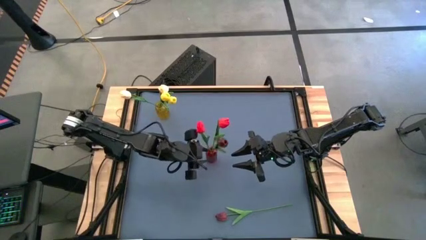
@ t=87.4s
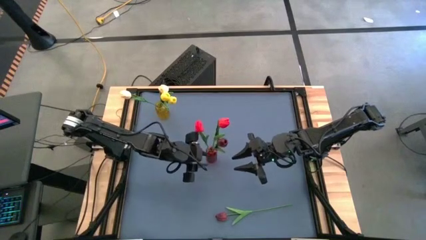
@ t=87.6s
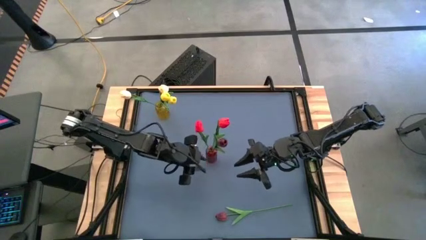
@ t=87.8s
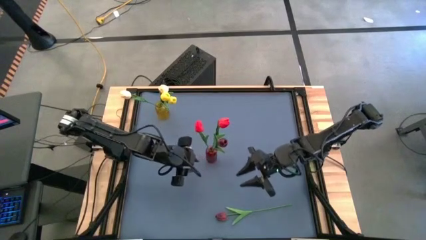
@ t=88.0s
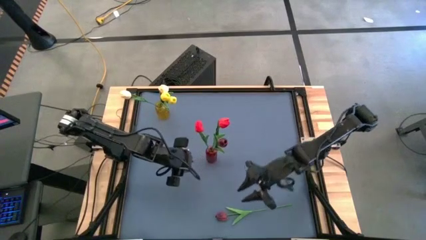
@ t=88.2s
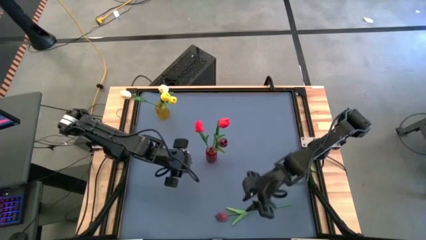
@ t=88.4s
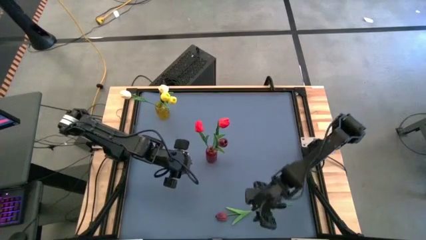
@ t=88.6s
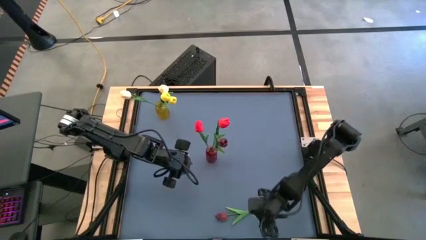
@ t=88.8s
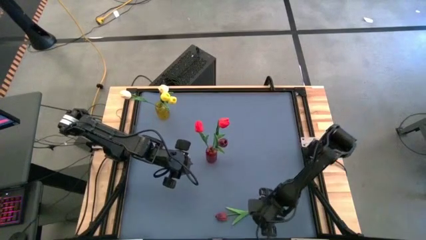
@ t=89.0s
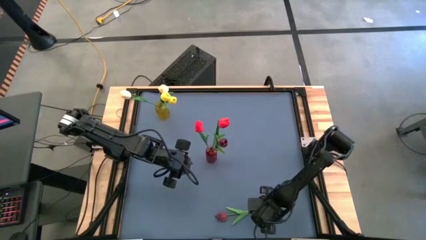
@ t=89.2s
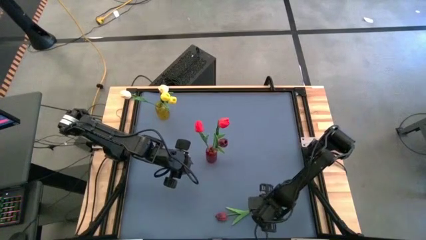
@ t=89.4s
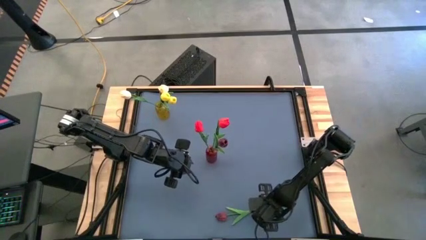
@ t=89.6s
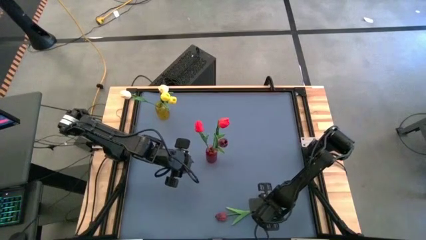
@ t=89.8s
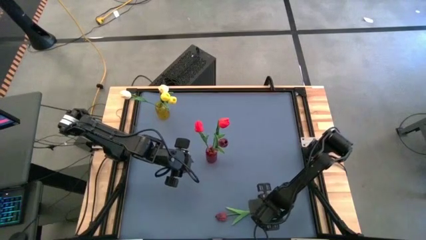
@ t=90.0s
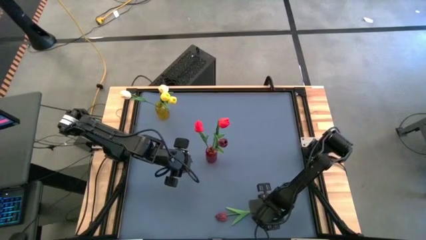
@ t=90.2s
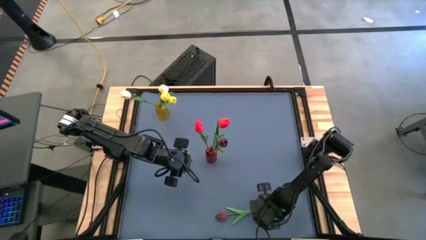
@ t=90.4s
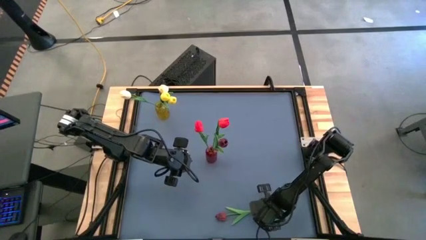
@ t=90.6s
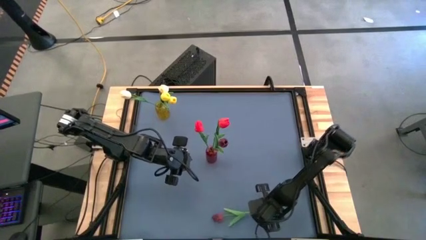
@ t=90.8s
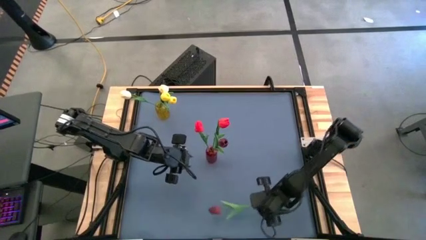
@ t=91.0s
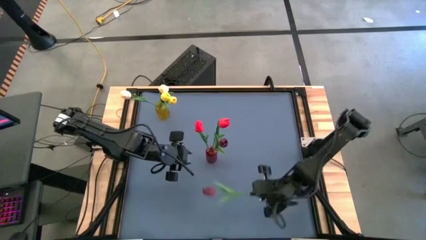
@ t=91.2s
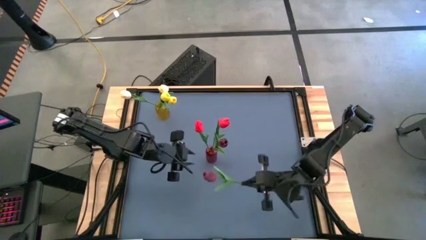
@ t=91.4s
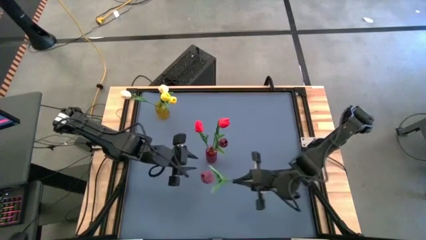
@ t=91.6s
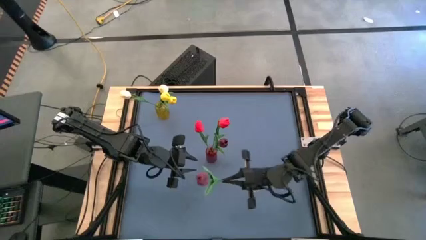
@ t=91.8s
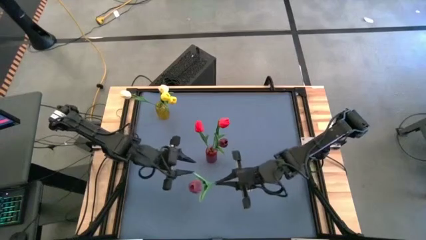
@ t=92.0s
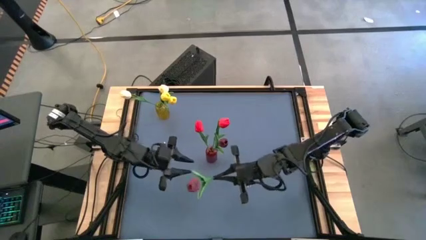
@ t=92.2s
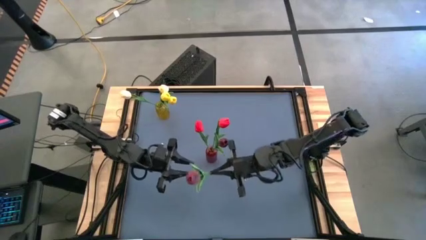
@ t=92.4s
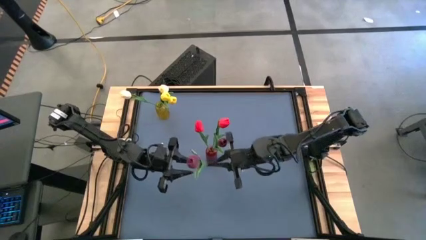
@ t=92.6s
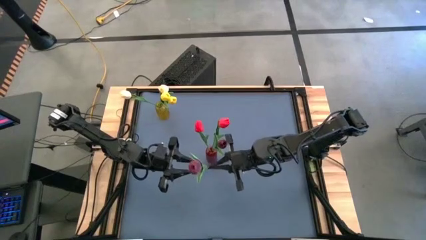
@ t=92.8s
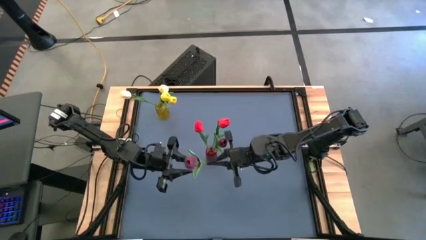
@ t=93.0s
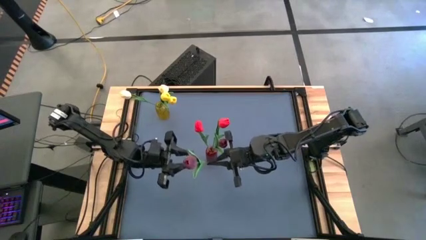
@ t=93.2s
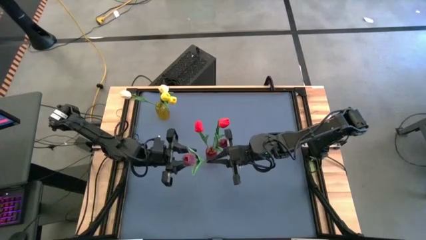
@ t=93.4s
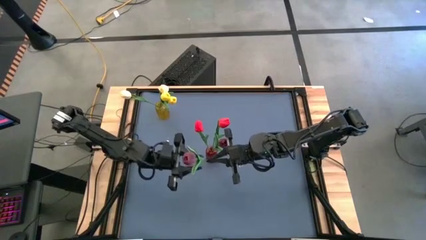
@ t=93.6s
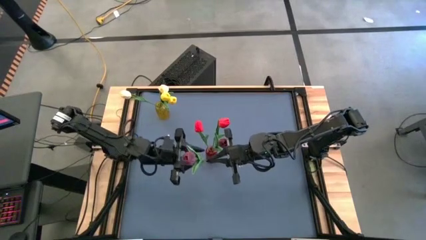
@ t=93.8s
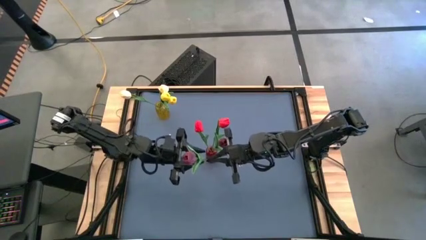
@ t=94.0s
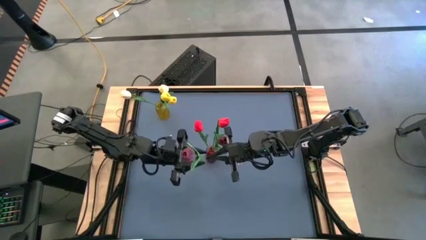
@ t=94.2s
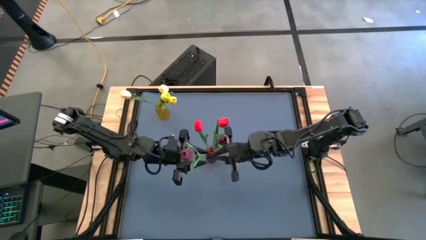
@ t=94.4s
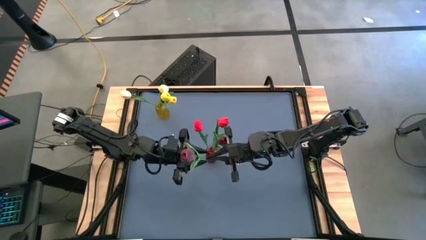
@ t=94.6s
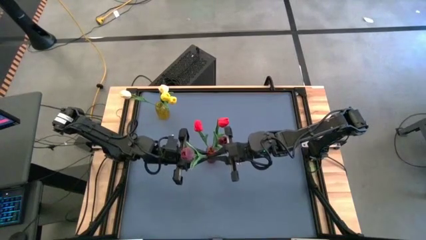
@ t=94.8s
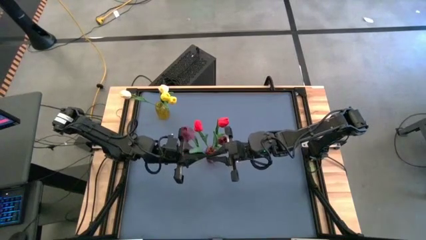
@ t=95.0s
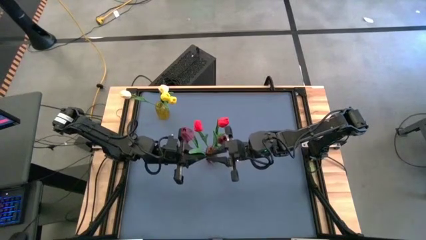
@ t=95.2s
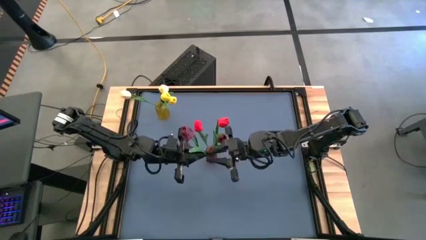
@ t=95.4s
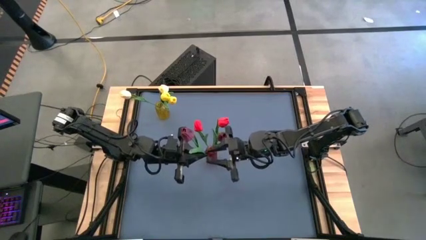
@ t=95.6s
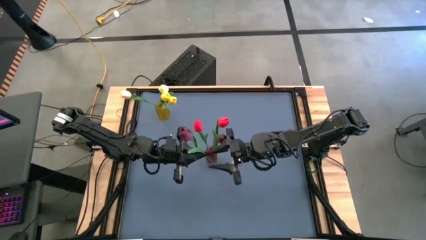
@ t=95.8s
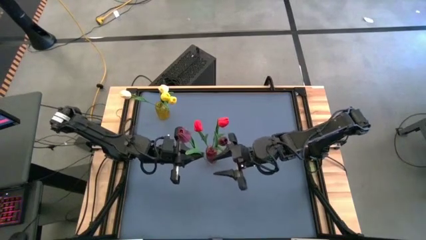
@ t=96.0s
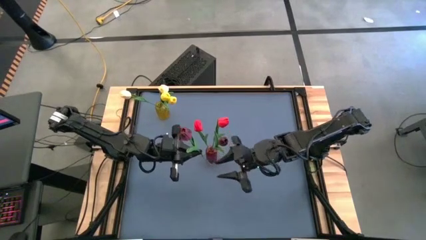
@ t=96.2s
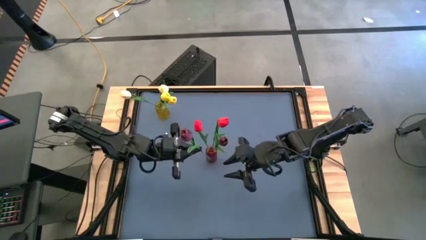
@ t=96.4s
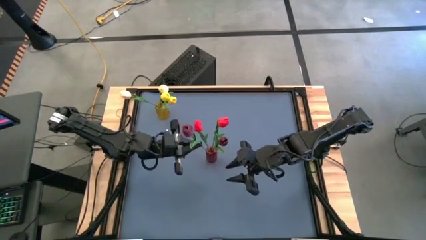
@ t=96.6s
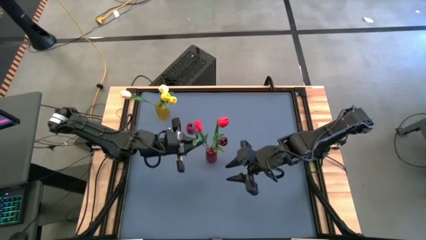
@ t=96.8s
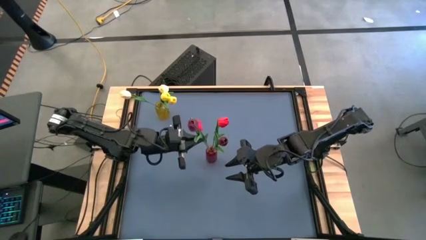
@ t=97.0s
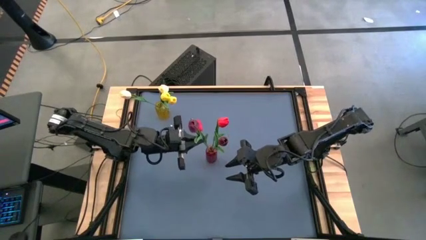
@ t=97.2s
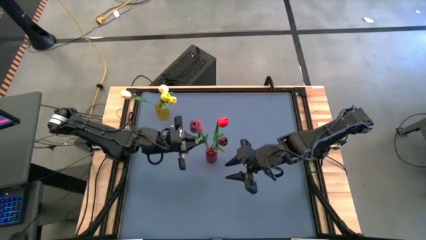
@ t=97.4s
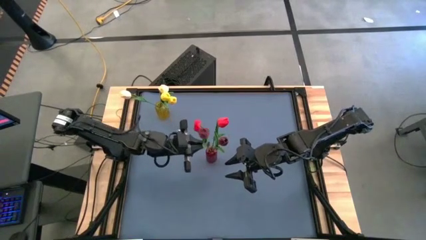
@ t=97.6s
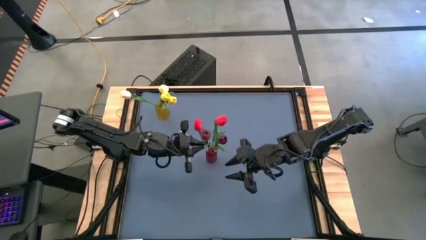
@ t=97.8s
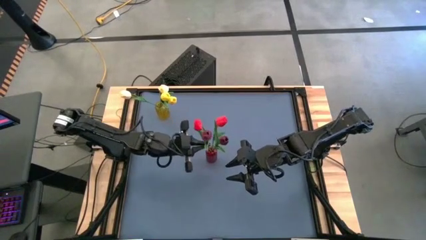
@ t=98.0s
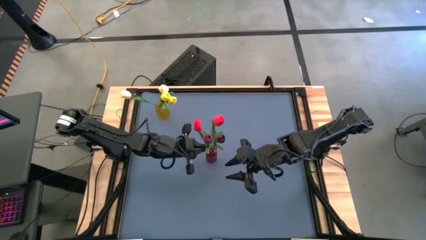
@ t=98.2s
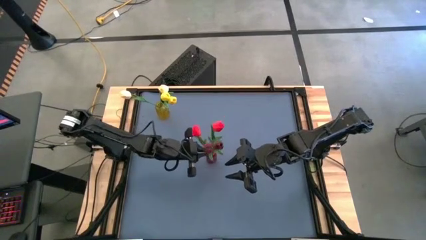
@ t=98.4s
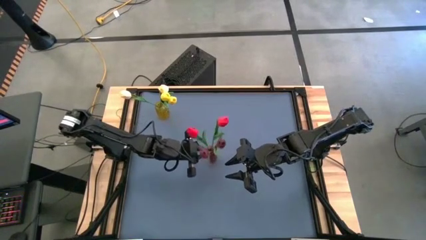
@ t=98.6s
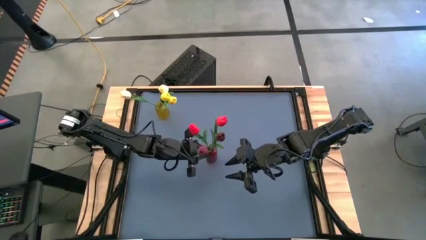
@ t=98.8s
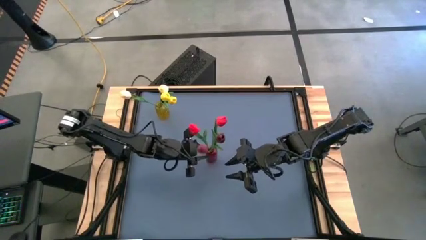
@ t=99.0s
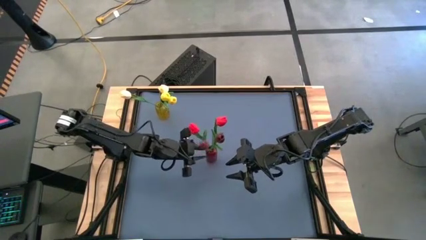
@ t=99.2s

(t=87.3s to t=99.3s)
Task: Sort flowers into vase by color
Put the red flower into the red vase

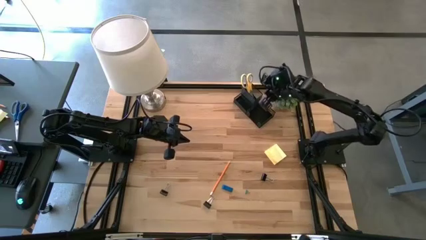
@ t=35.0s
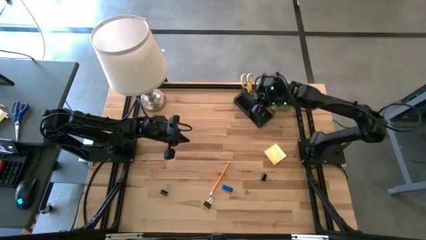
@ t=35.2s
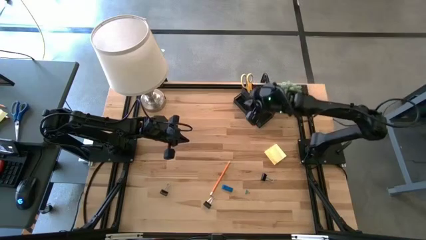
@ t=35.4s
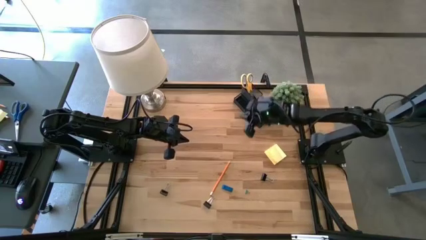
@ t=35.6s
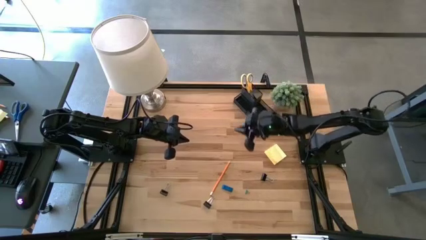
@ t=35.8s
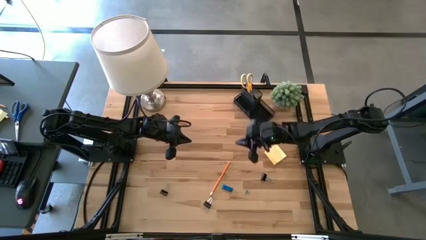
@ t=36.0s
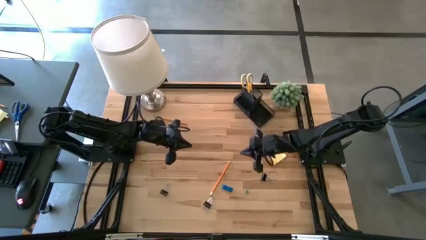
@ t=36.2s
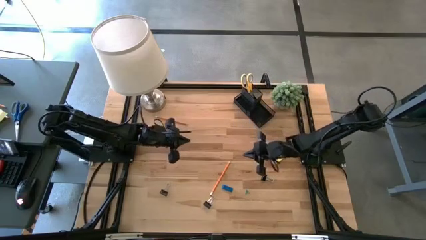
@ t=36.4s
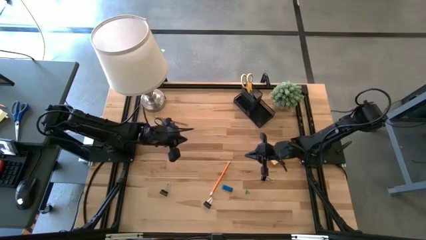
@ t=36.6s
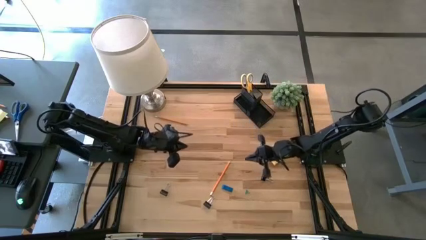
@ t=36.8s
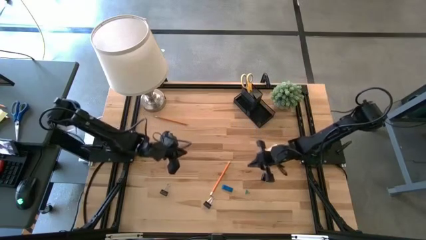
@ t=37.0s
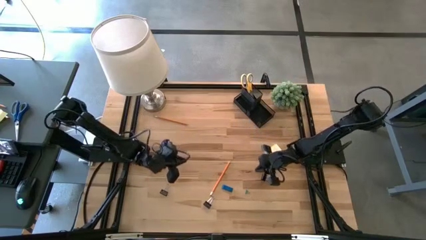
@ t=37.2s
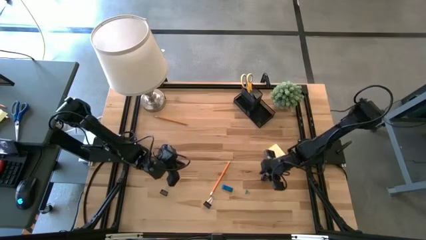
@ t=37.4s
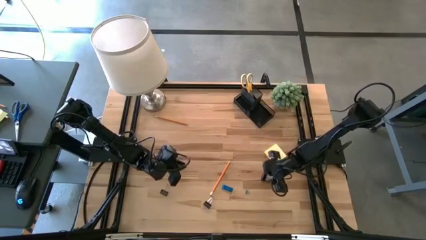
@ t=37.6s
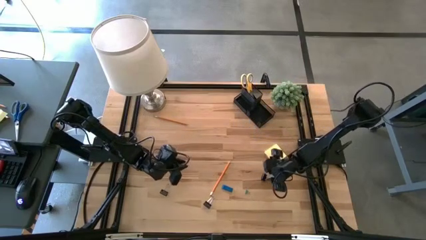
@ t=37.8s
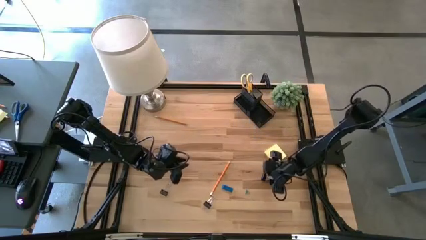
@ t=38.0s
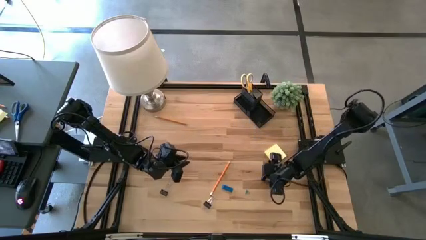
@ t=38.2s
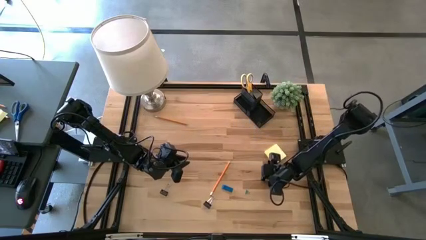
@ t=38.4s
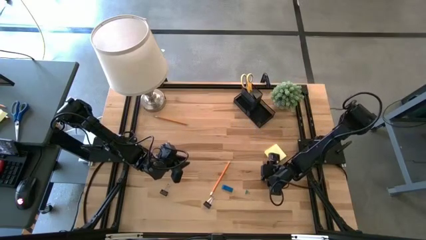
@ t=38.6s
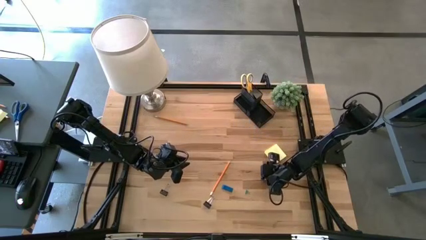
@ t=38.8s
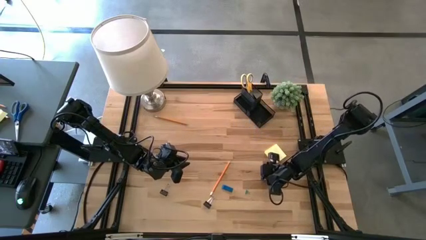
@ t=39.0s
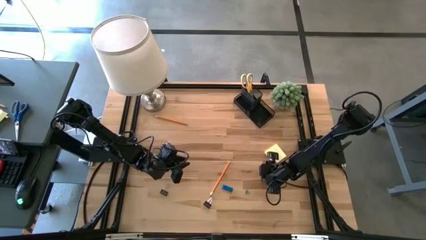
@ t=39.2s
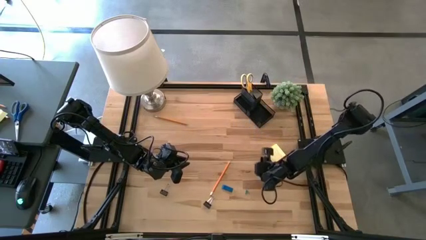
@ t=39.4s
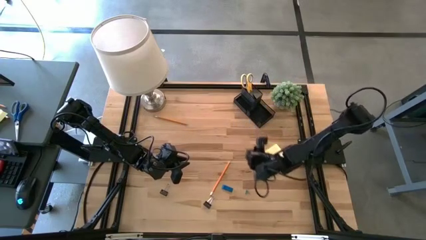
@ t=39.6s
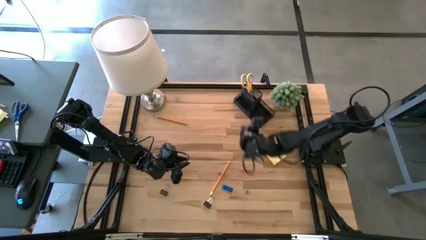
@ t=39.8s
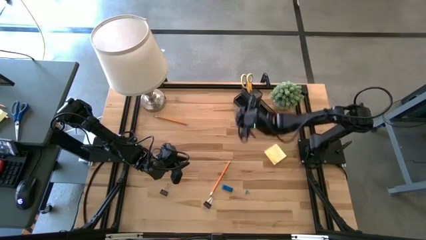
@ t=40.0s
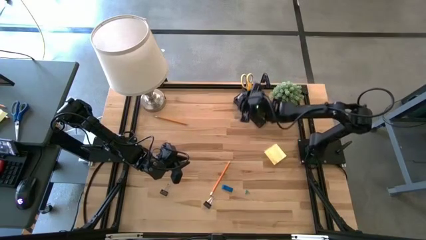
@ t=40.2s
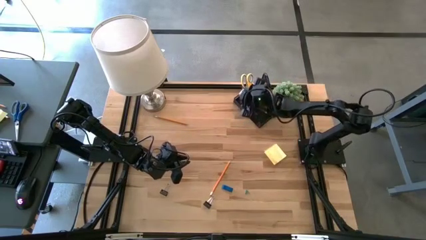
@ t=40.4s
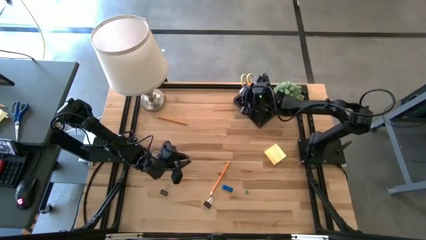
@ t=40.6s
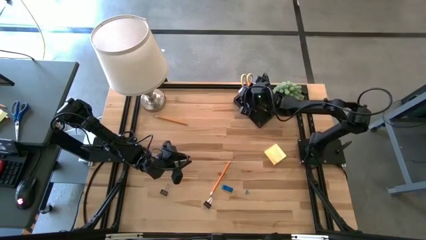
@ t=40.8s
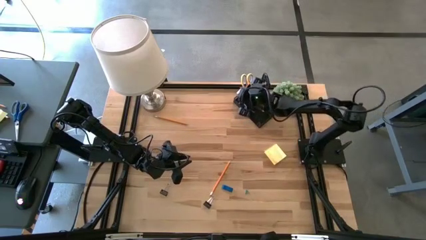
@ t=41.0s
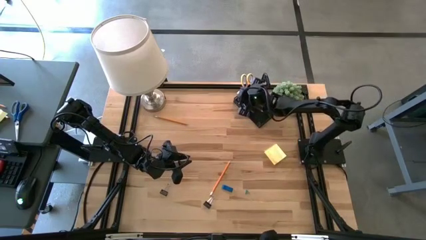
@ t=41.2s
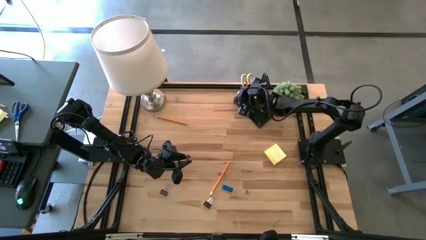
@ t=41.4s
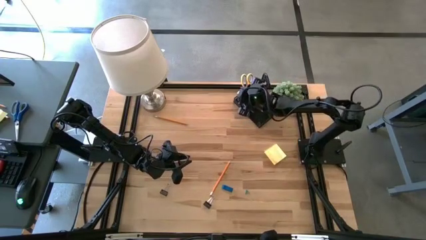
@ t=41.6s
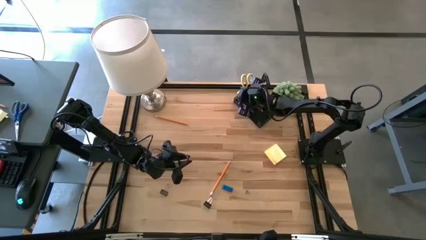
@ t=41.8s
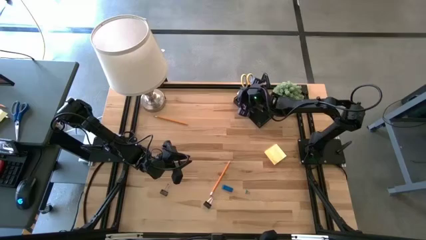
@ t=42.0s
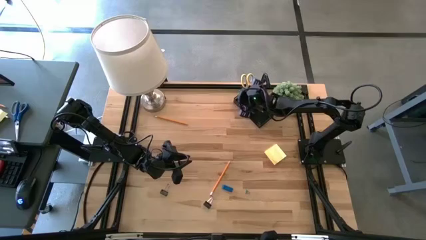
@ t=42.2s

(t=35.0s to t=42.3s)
Task: Pick and place office supplies into organizer
Put the top right black binder clip into the desk organizer
